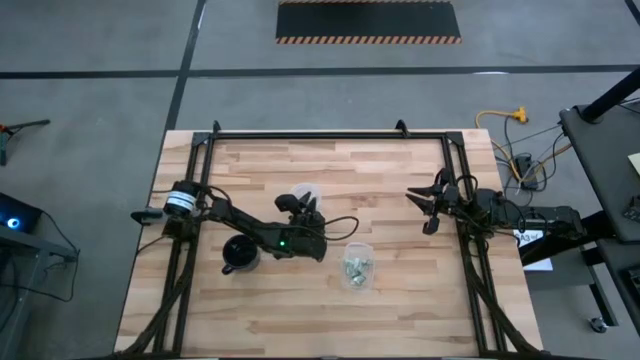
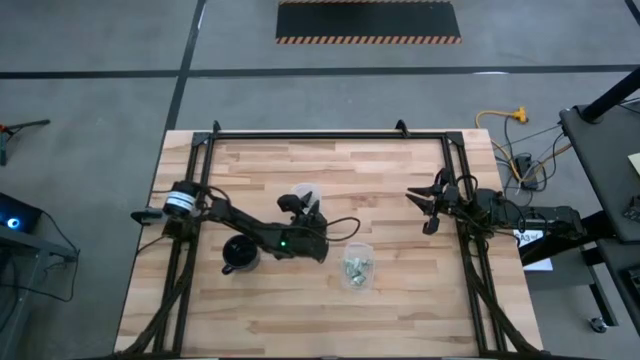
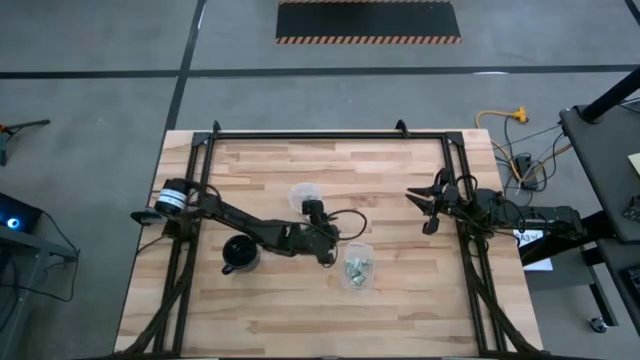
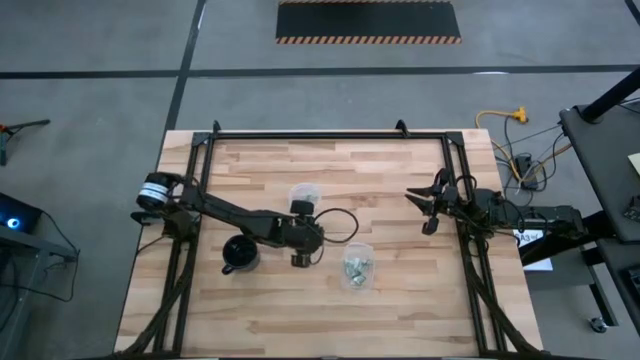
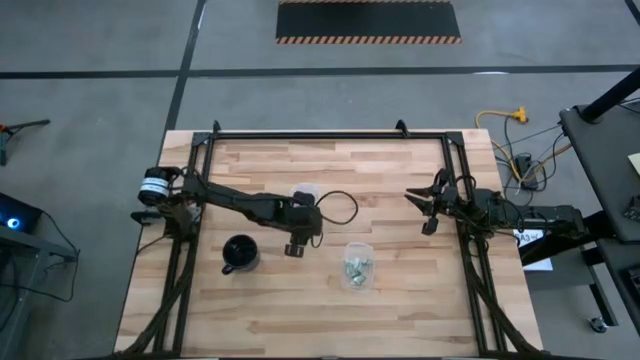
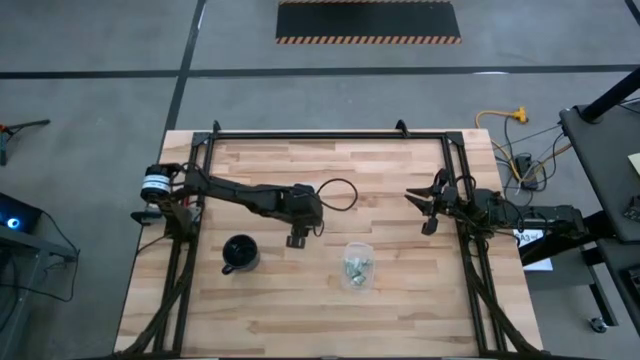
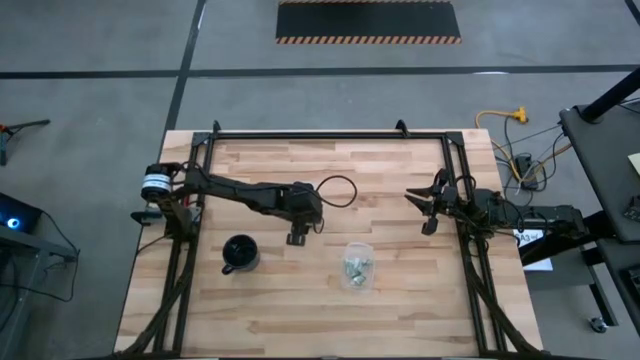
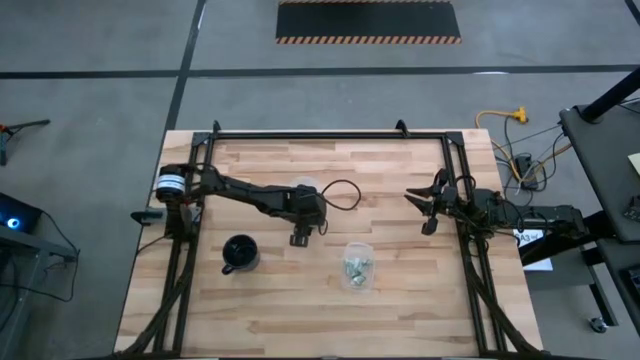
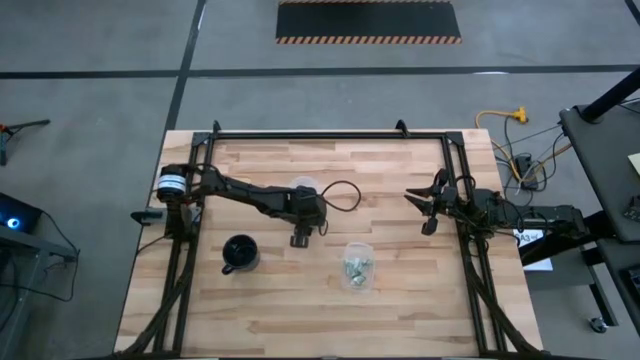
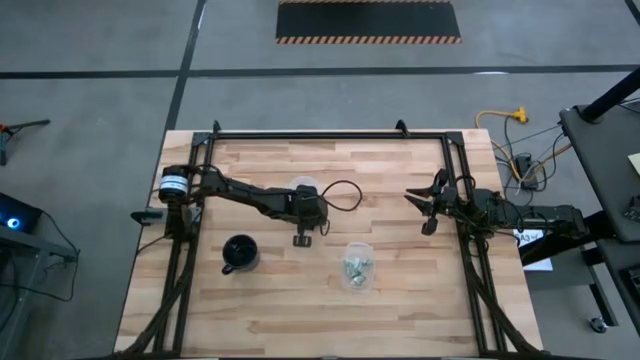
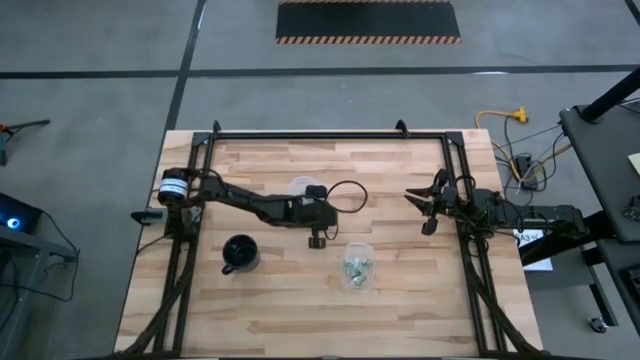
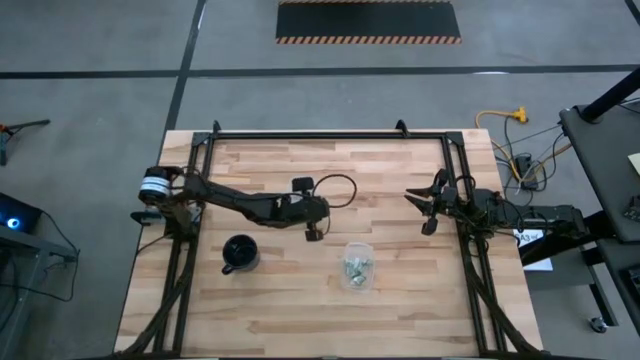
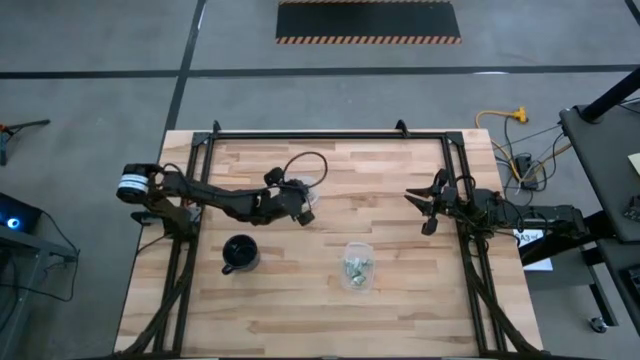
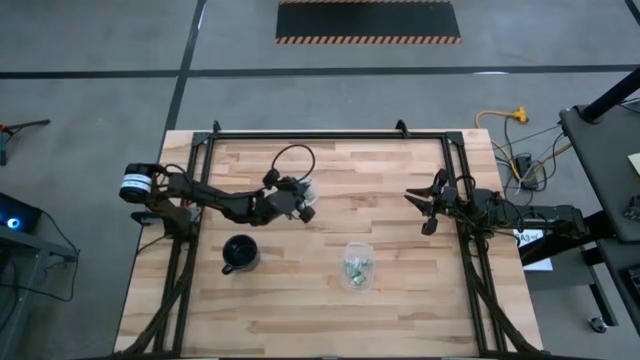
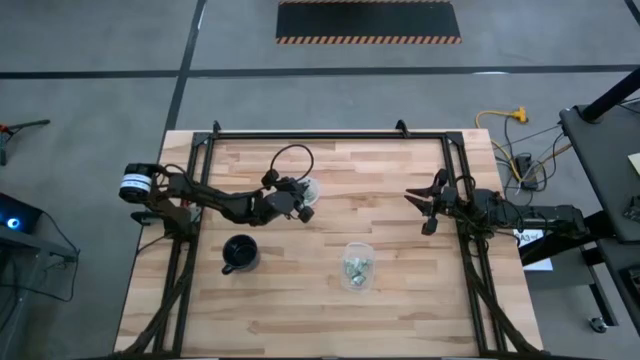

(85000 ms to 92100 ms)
Task: Pick and place items into bin
Put the stevia packet into the round transparent bin

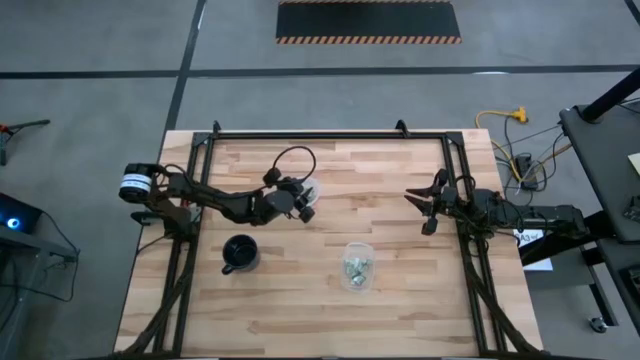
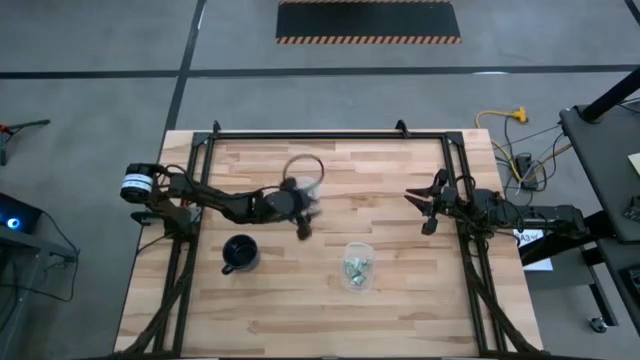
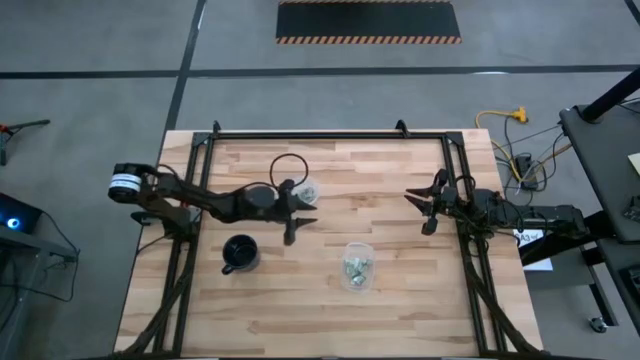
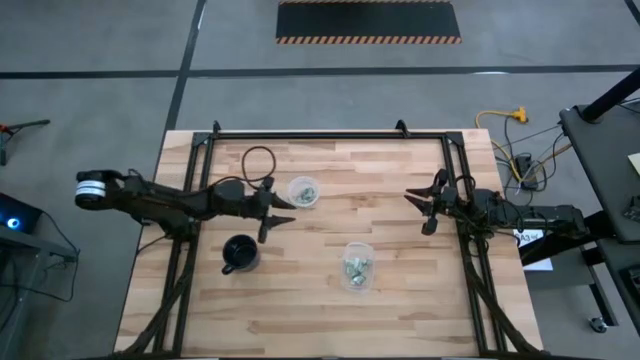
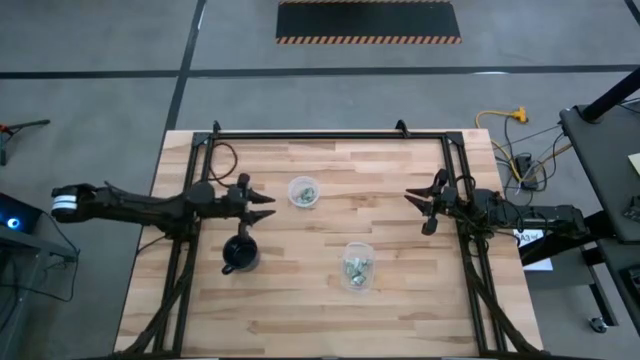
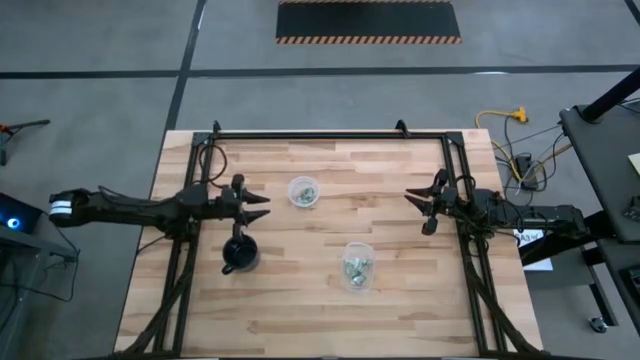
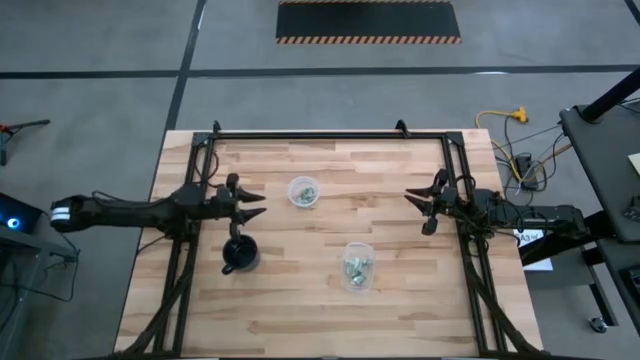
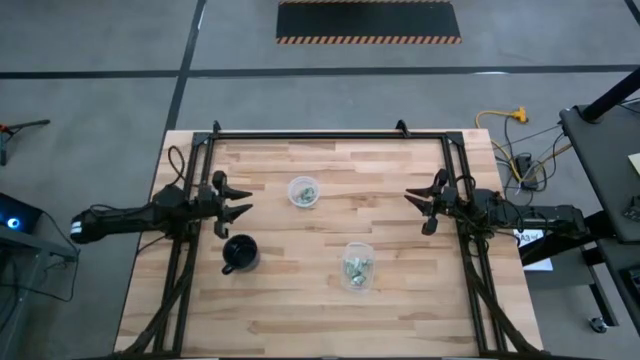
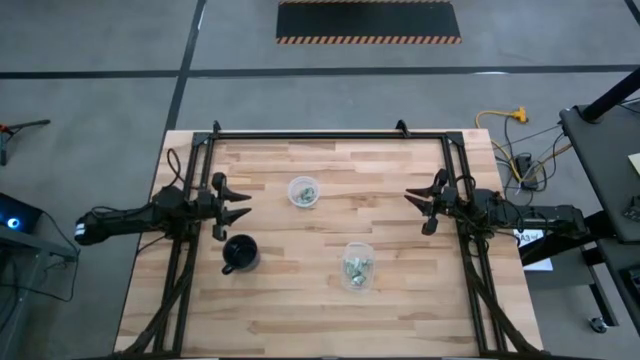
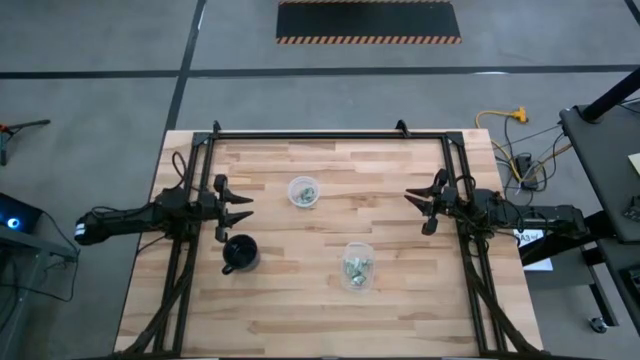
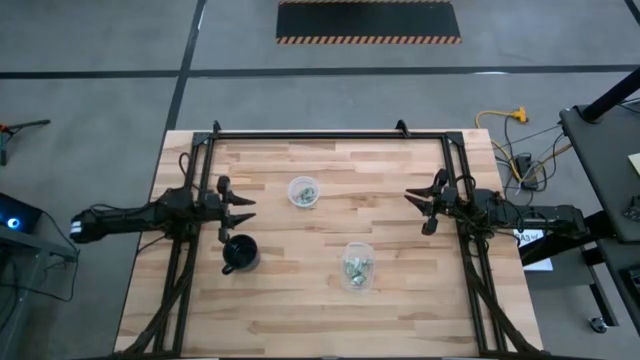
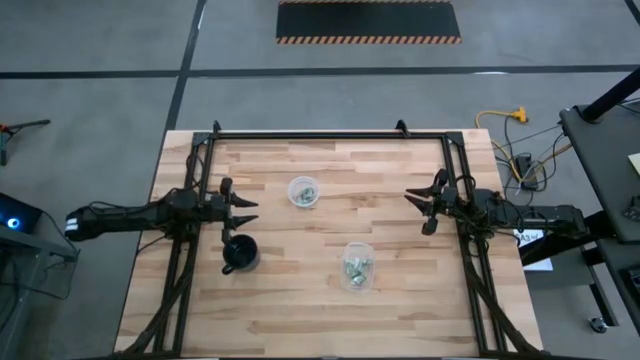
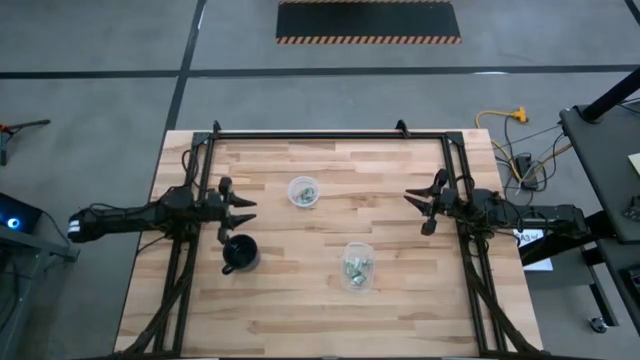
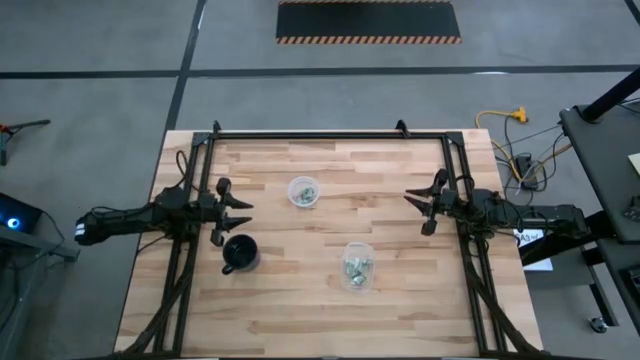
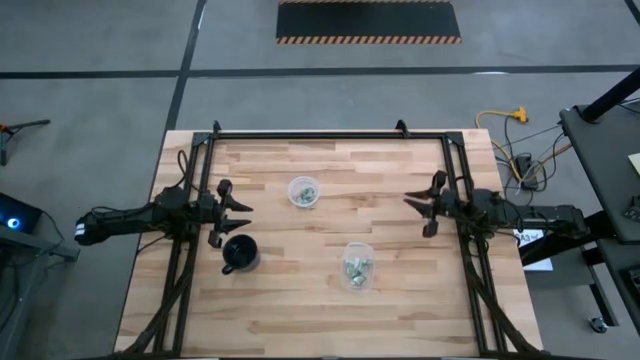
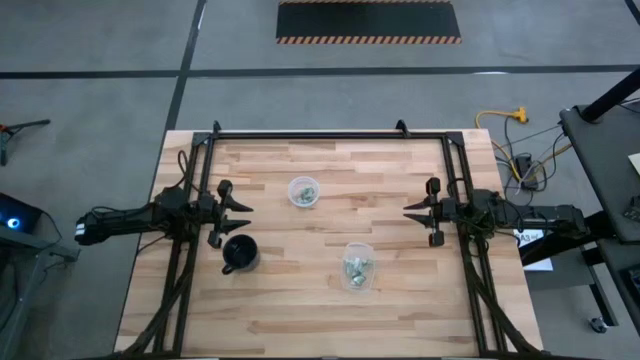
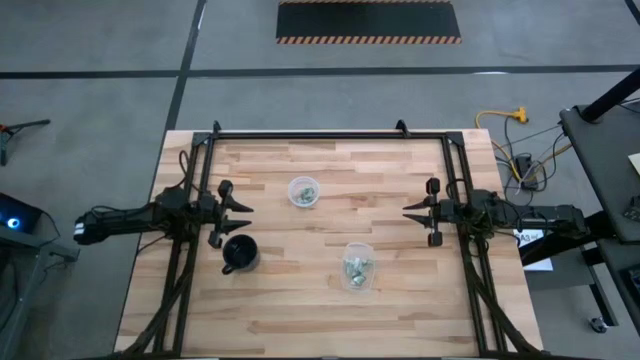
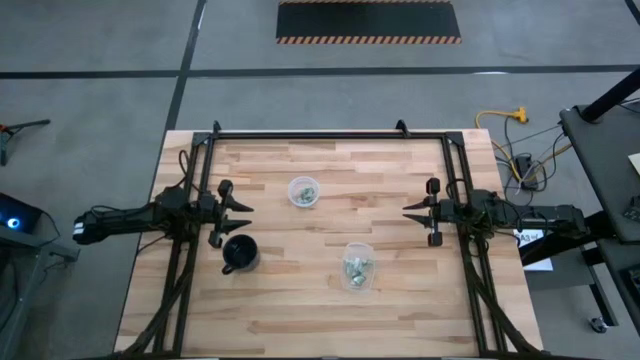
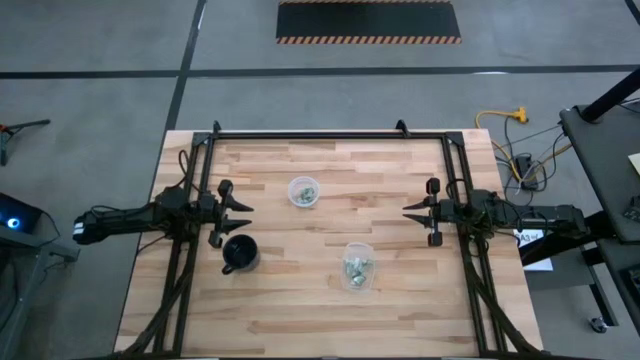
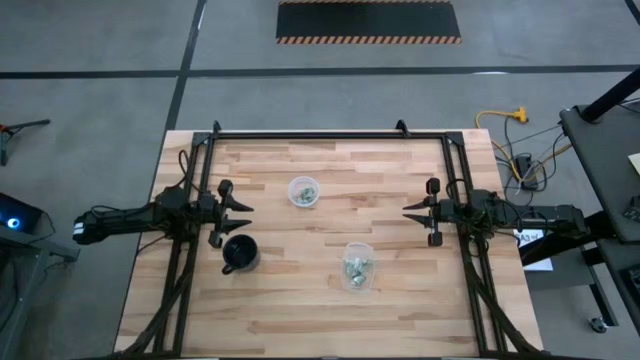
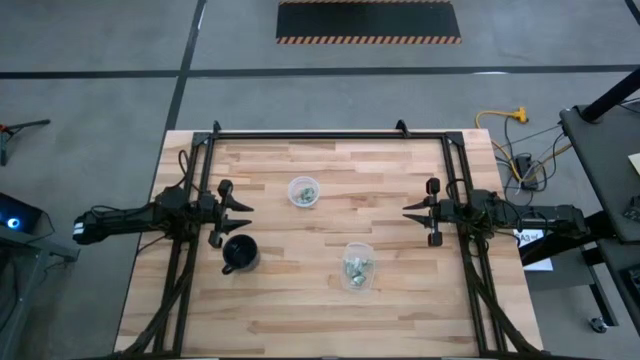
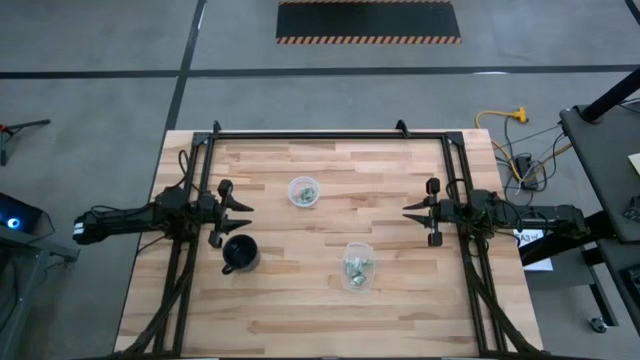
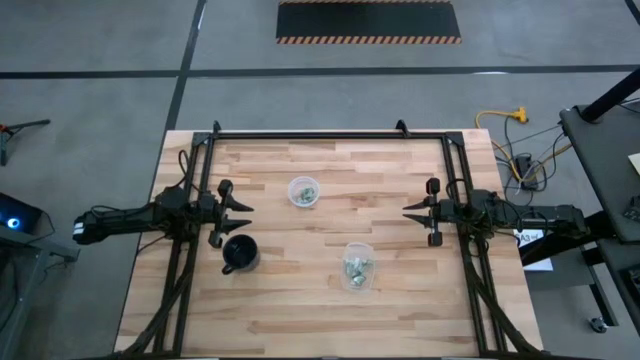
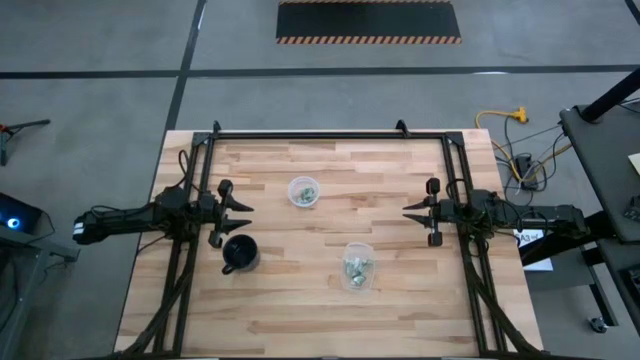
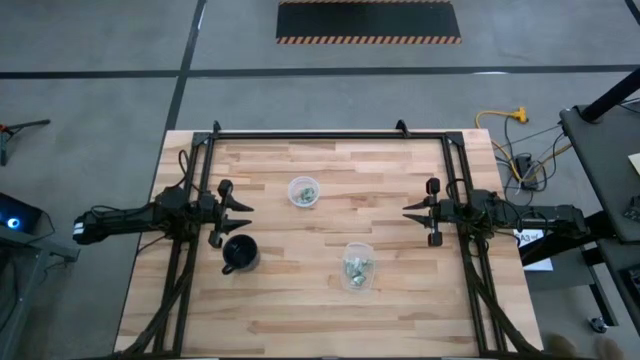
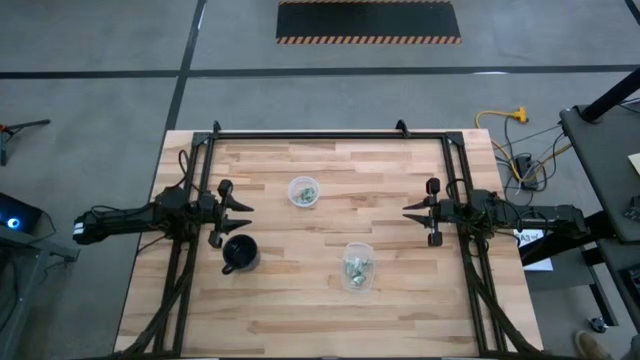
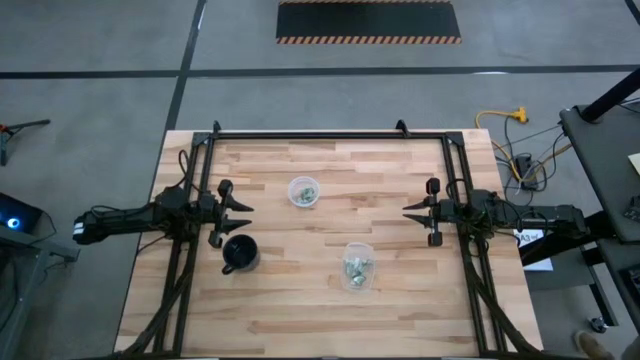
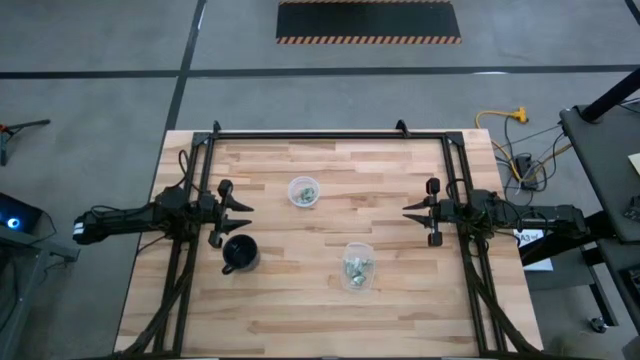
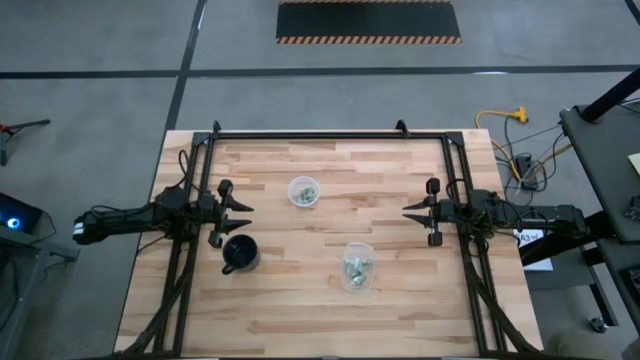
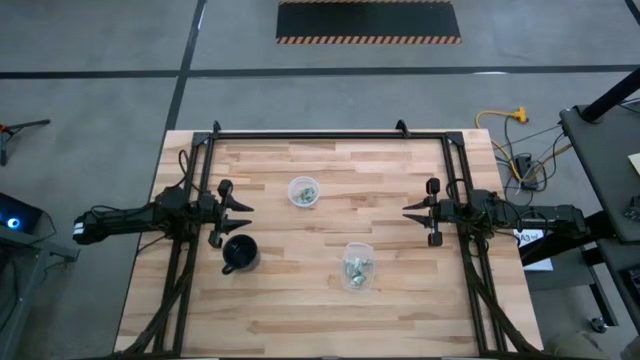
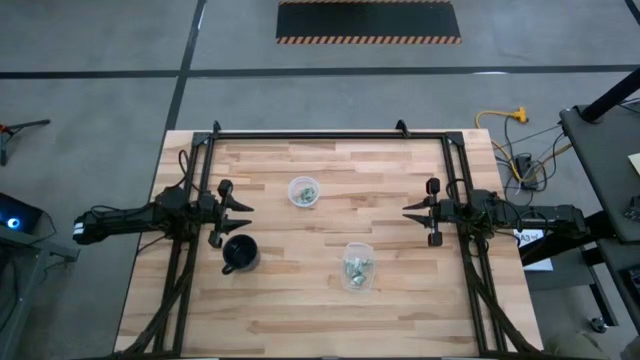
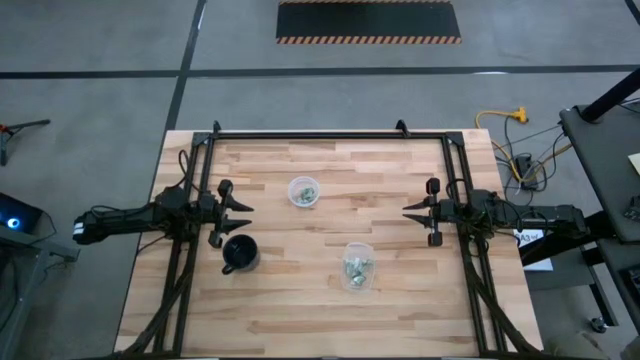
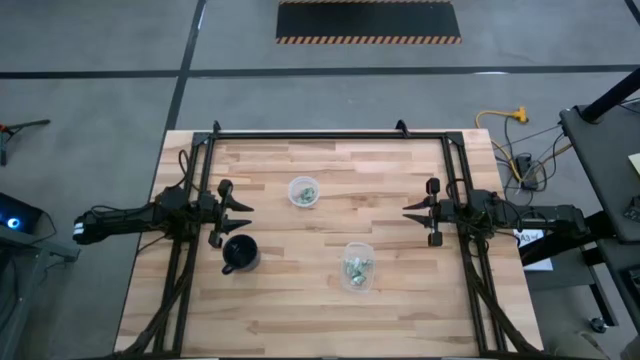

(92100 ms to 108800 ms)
Return to Home Position
